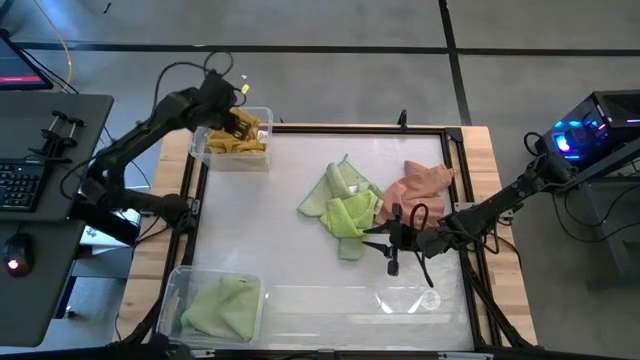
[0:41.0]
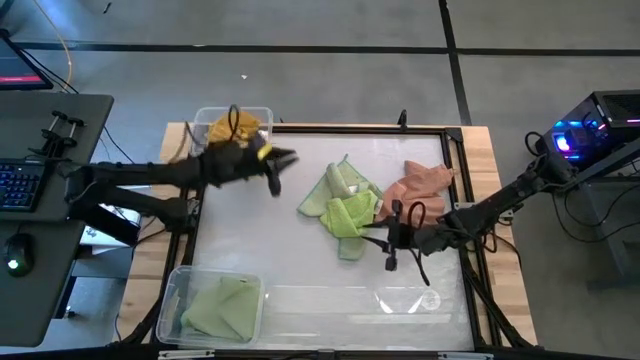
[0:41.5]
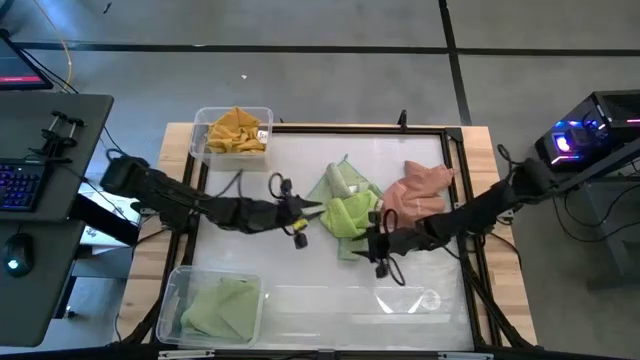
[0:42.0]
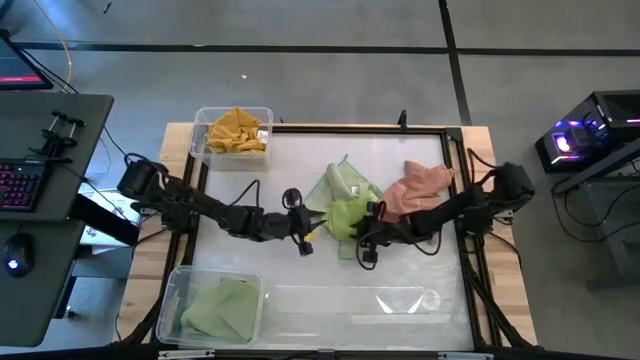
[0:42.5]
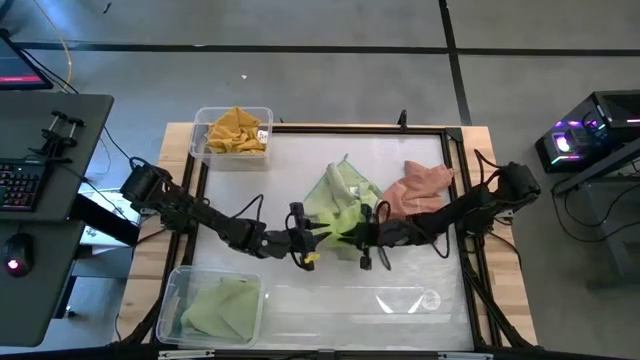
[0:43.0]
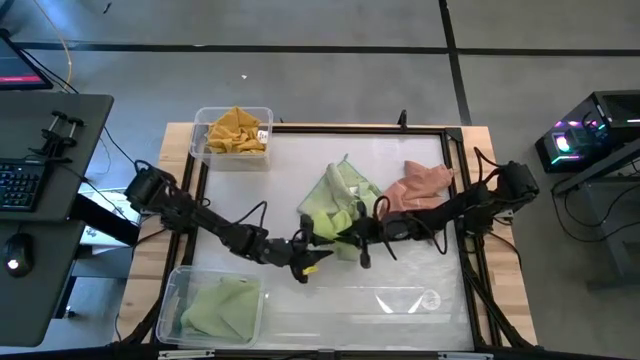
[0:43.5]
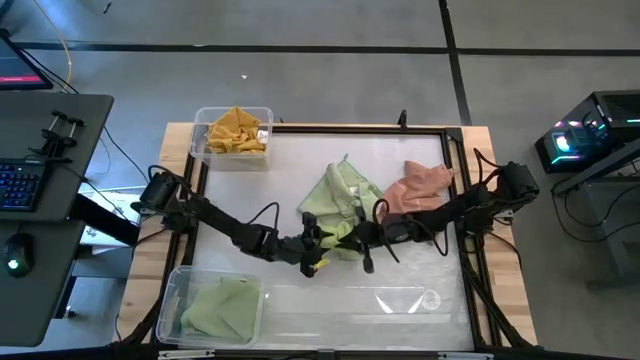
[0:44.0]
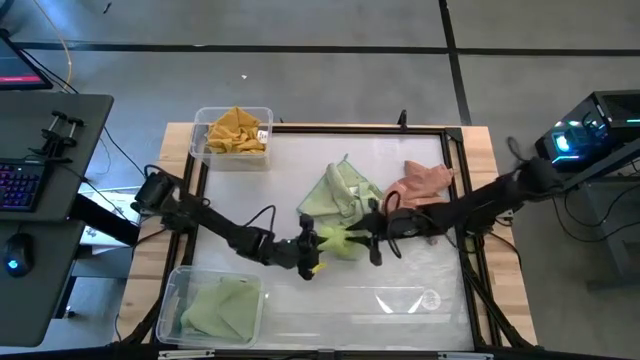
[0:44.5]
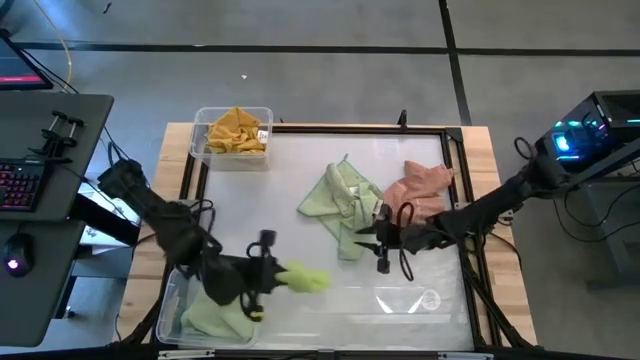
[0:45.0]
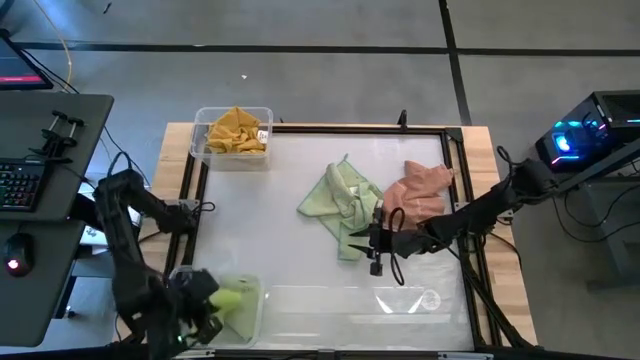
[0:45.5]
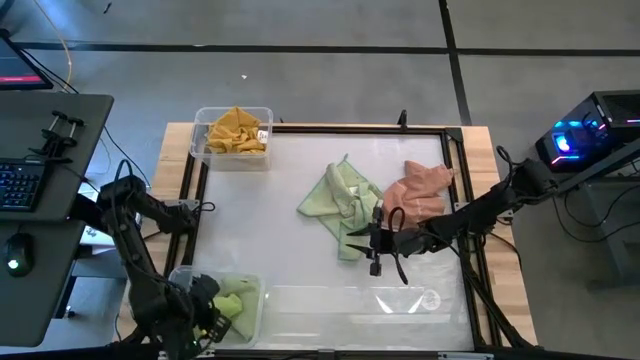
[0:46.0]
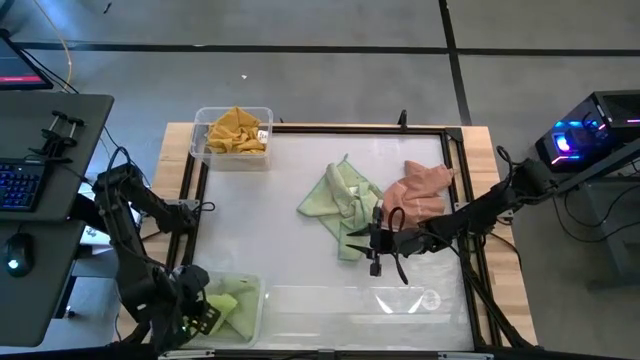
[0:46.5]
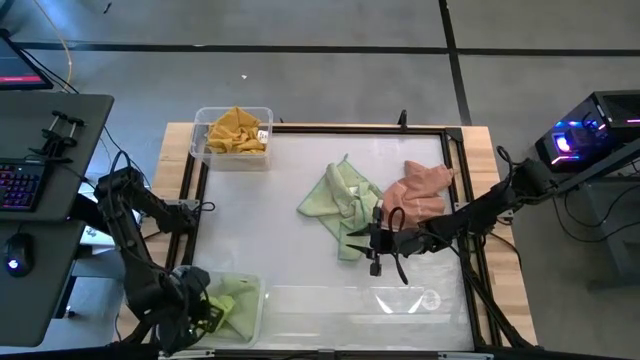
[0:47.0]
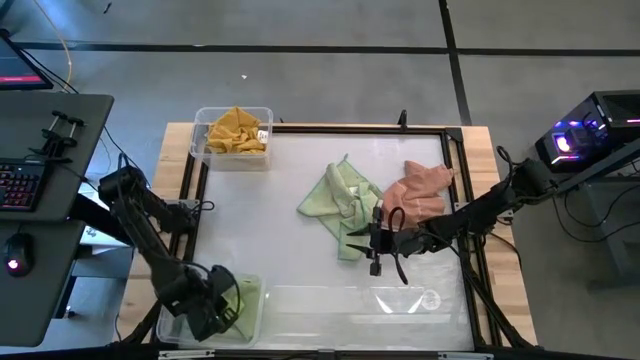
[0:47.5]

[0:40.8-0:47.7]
Task: Sort towels by color in basket
Put the light green towel into the bottom transparent bin

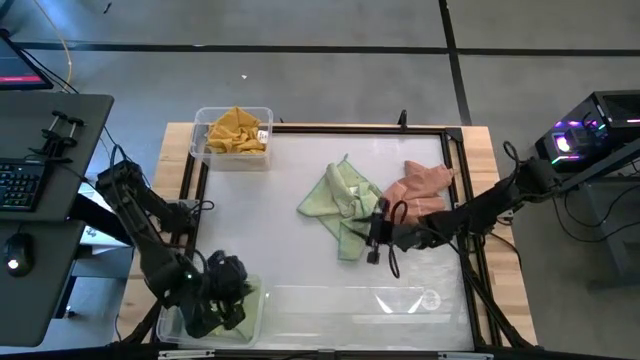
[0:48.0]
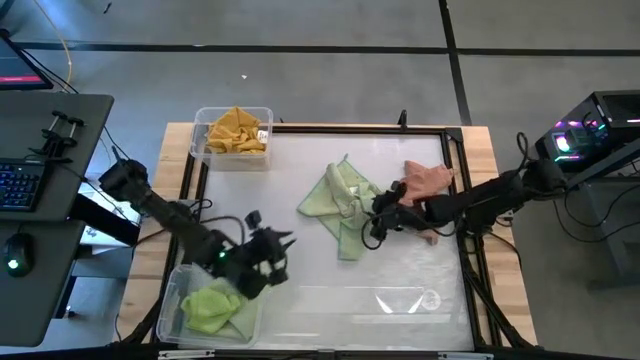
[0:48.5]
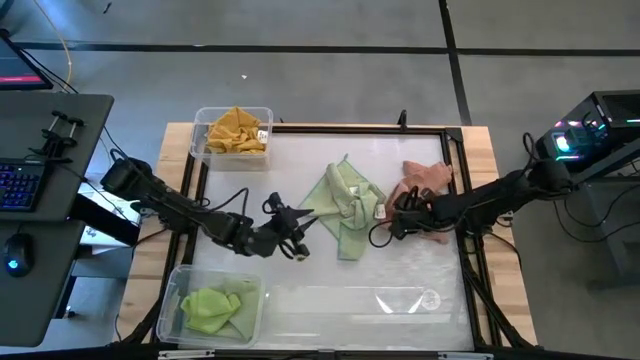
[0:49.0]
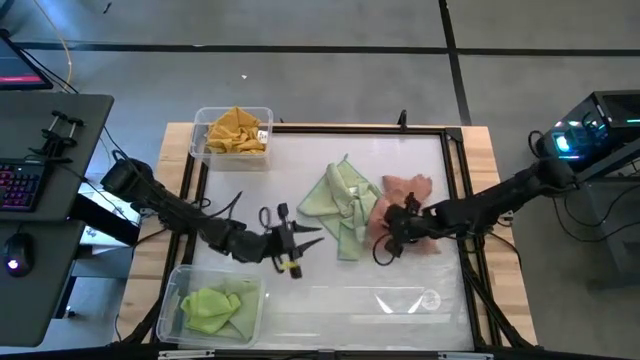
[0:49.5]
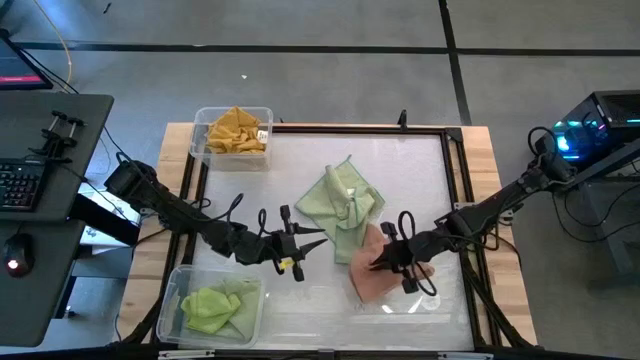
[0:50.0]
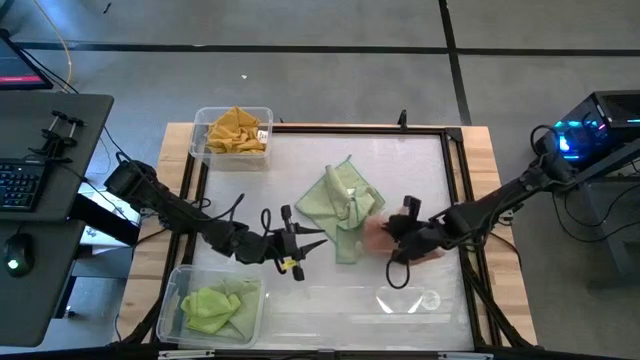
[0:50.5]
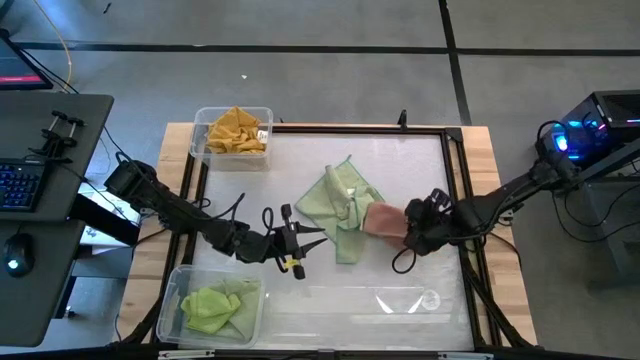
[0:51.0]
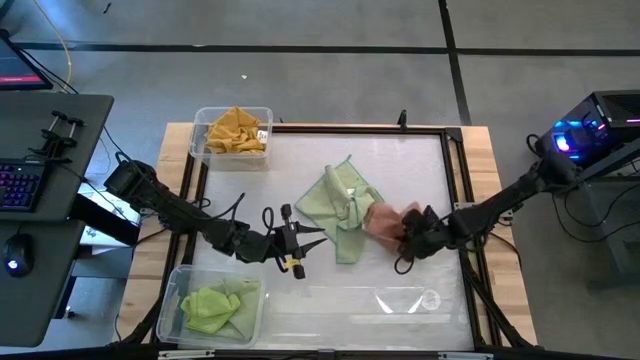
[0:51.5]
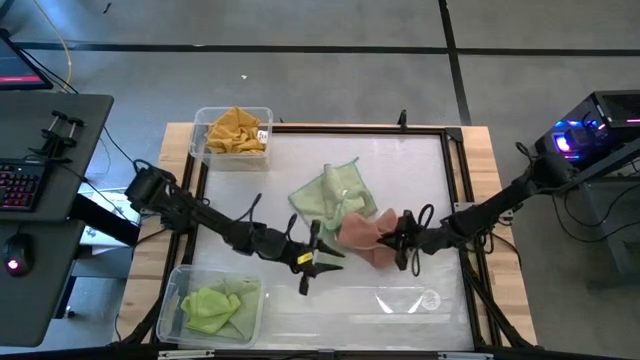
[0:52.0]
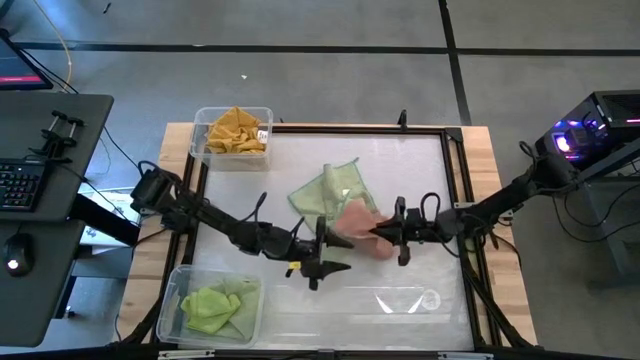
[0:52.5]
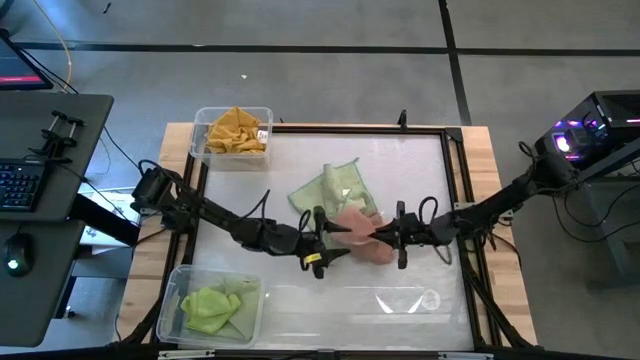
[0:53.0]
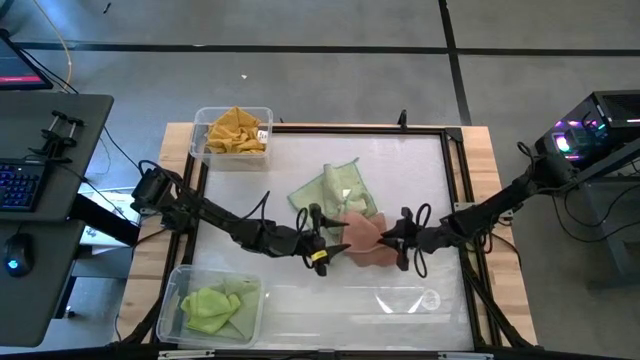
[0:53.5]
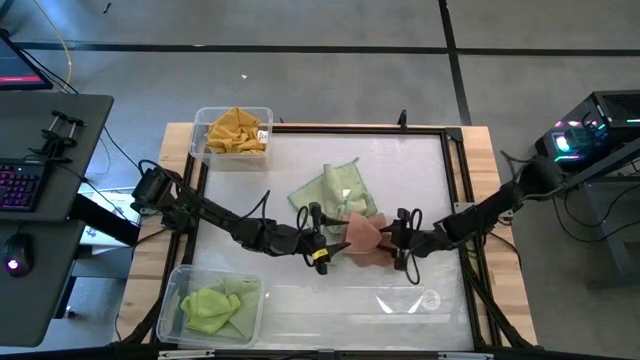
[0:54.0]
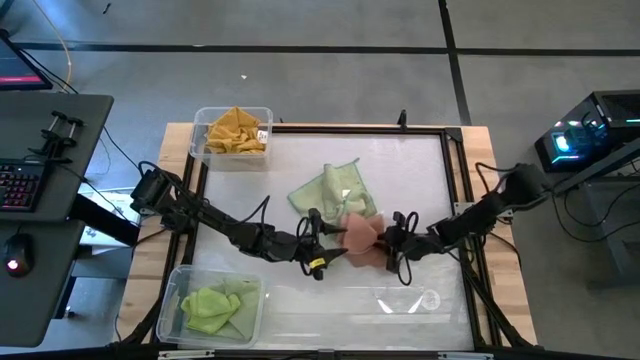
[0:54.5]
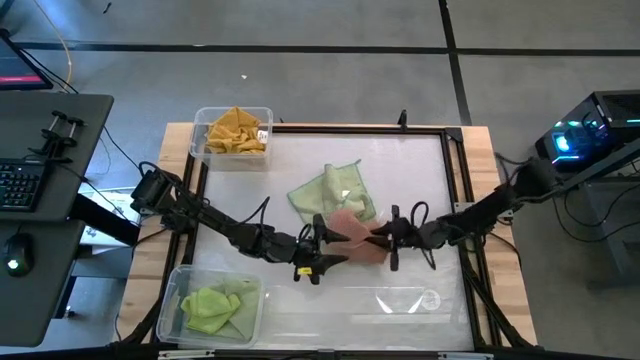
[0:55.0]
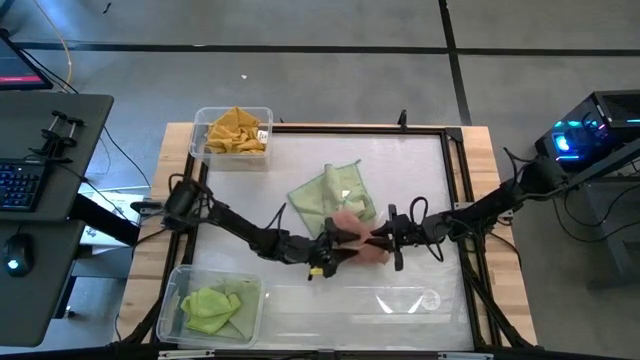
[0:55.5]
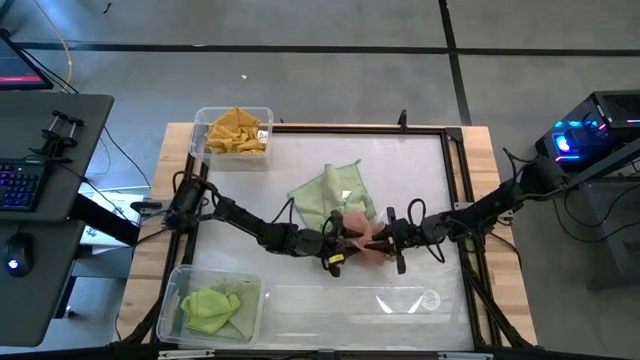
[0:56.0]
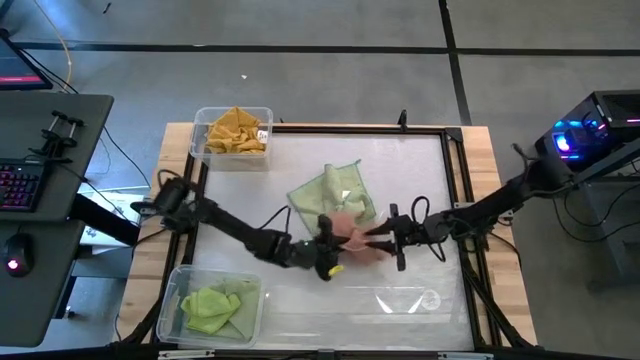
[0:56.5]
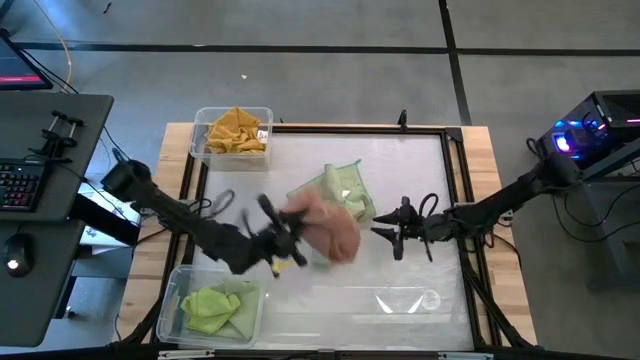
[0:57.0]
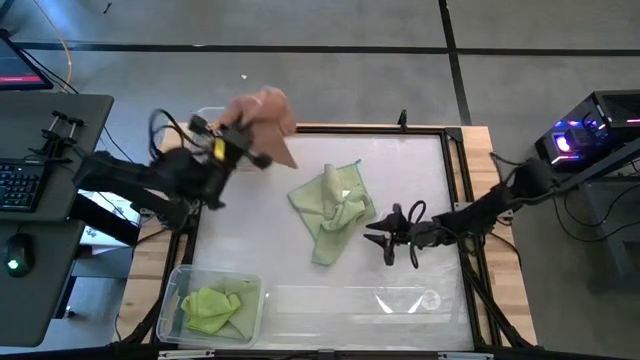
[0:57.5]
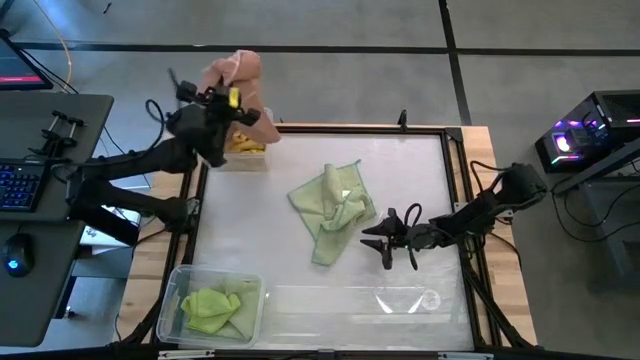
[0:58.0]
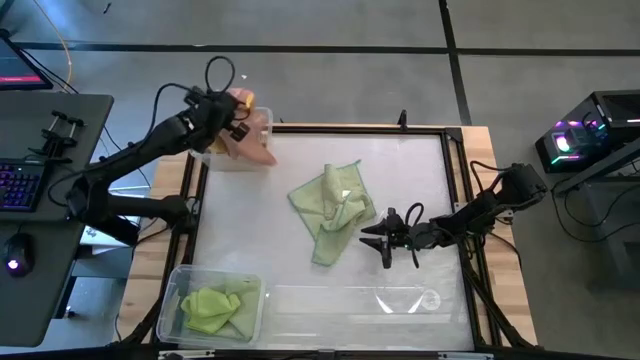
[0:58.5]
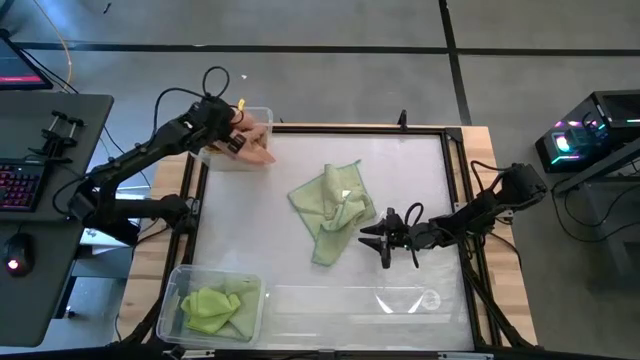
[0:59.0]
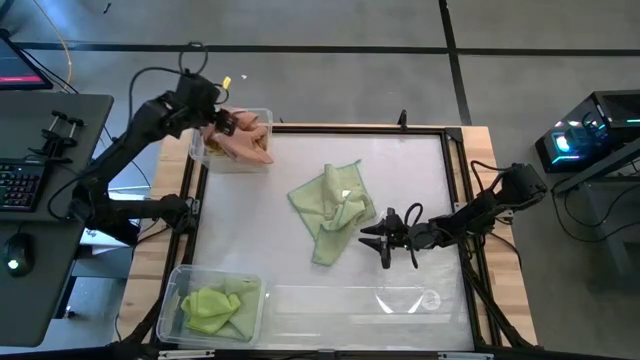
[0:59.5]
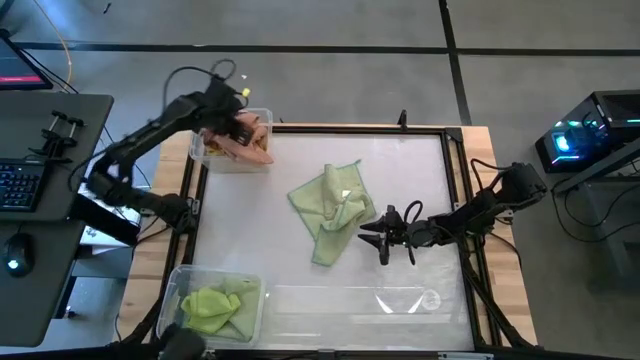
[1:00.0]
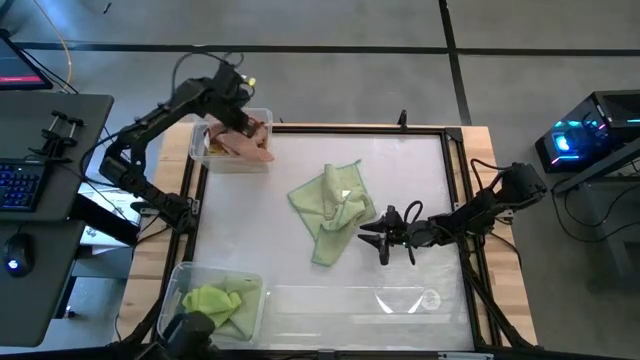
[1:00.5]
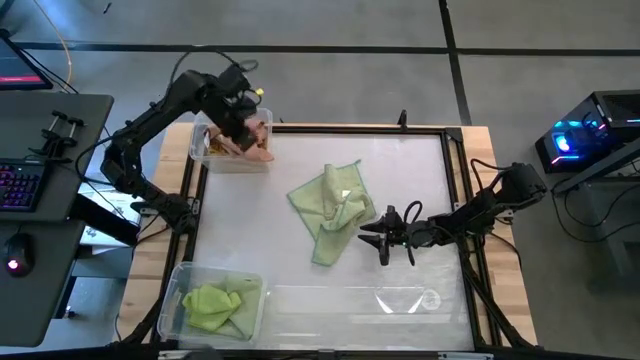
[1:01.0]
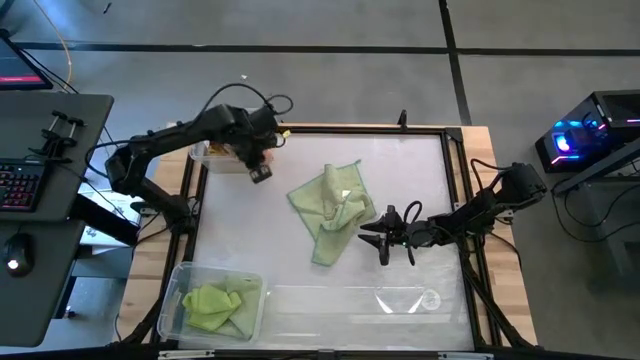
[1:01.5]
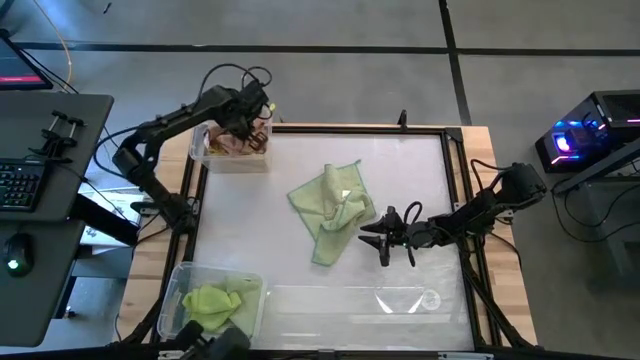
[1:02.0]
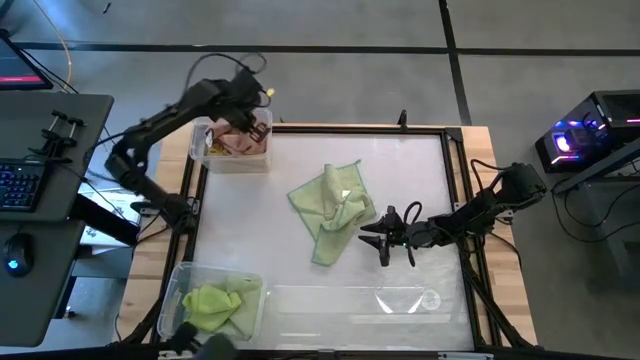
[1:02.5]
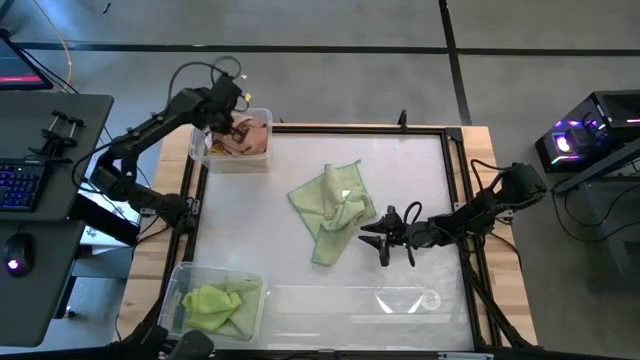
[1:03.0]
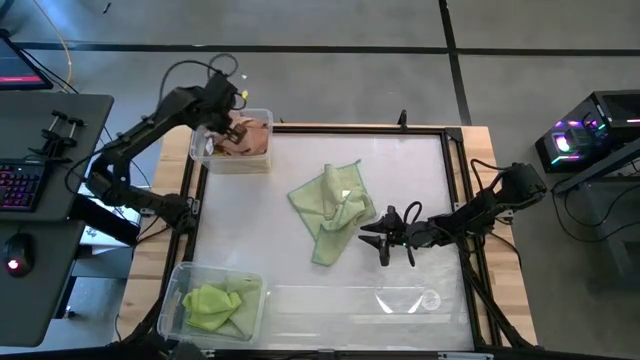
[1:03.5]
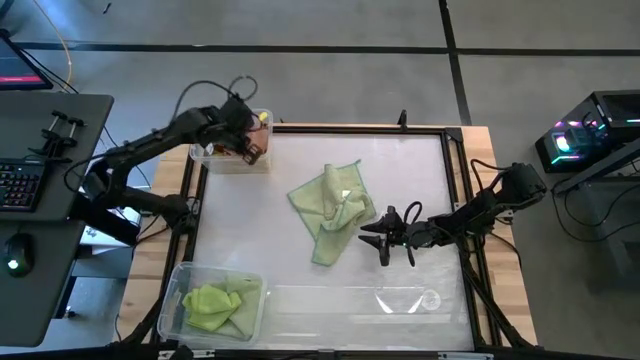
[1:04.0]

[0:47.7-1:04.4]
Put the dark orange towel into the top transparent bin
